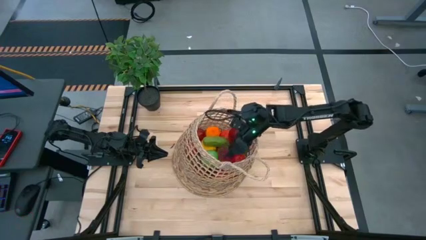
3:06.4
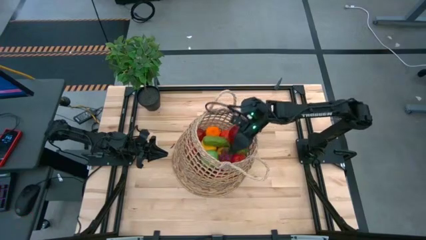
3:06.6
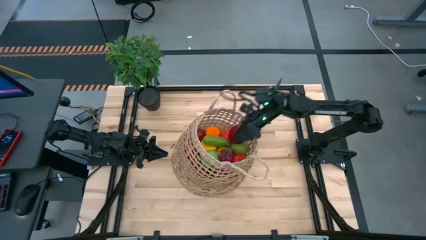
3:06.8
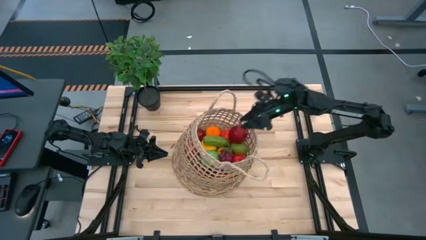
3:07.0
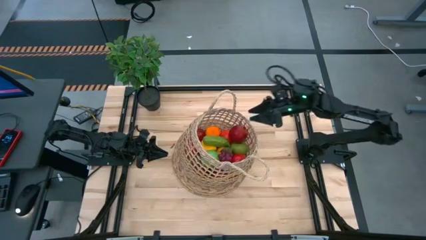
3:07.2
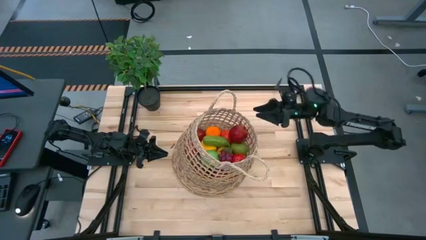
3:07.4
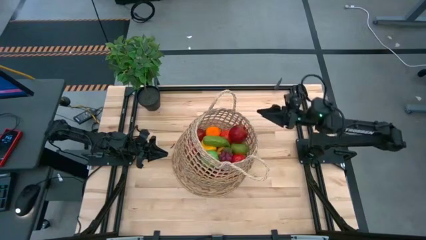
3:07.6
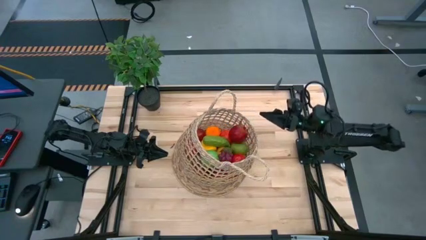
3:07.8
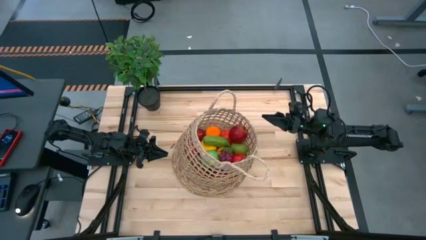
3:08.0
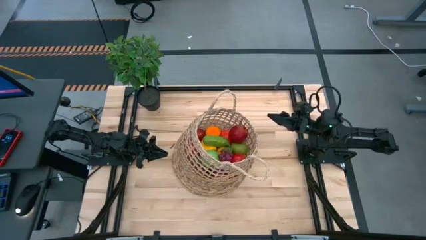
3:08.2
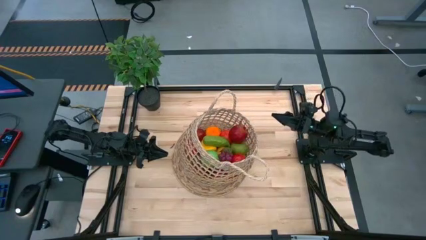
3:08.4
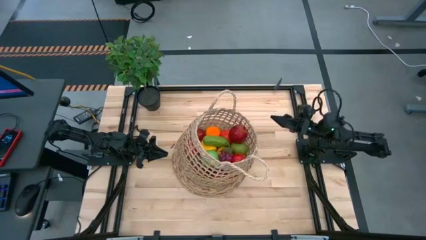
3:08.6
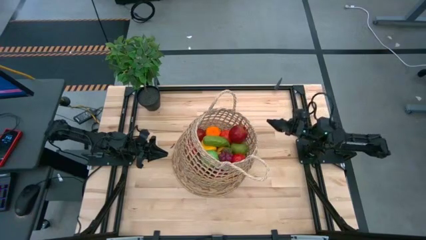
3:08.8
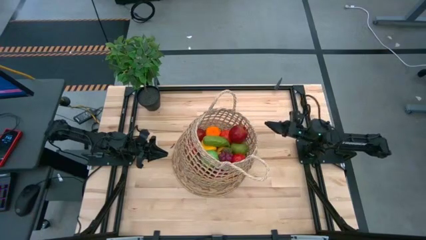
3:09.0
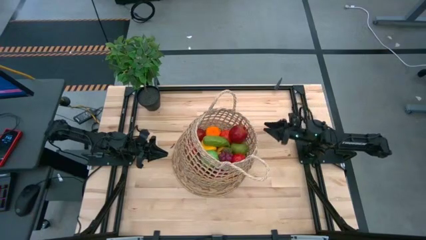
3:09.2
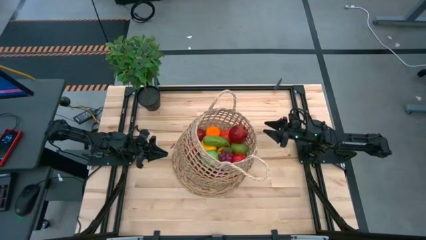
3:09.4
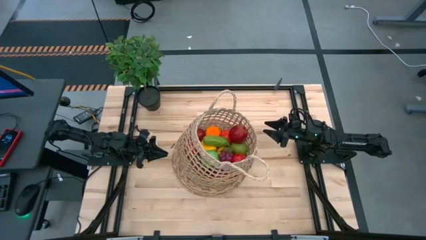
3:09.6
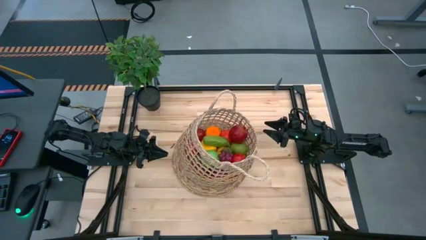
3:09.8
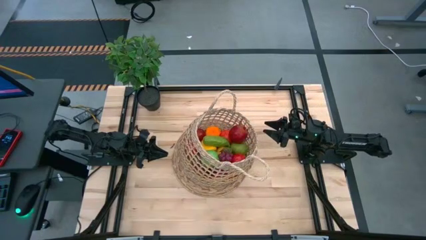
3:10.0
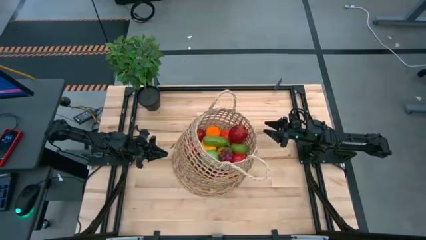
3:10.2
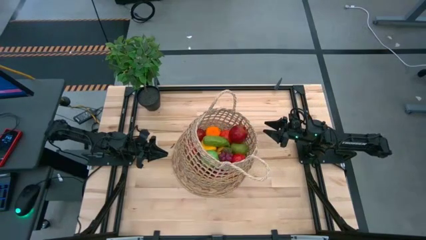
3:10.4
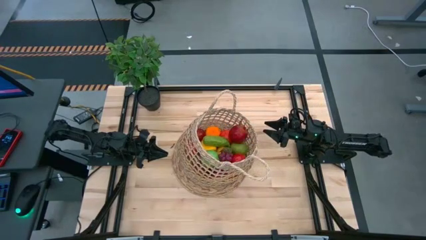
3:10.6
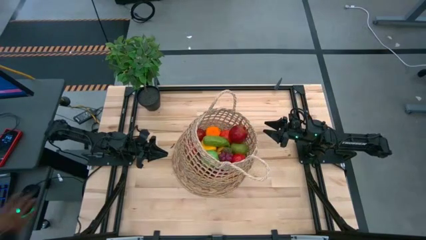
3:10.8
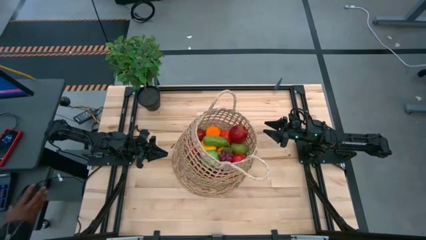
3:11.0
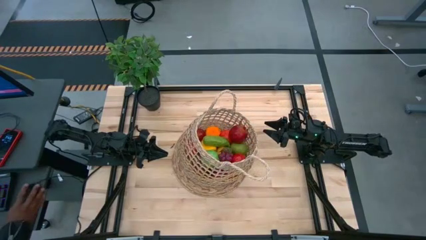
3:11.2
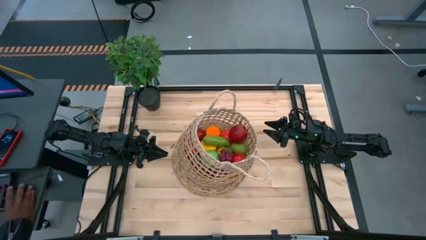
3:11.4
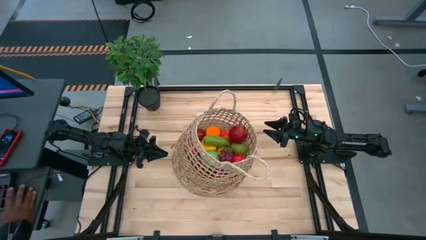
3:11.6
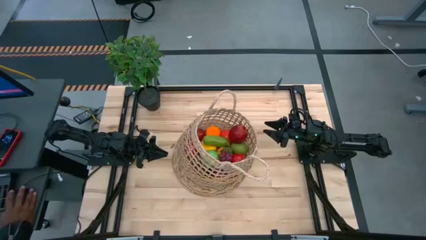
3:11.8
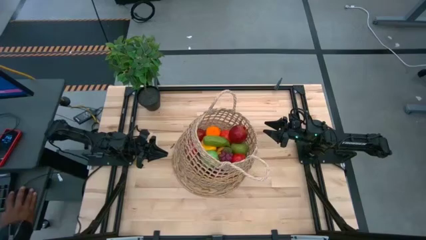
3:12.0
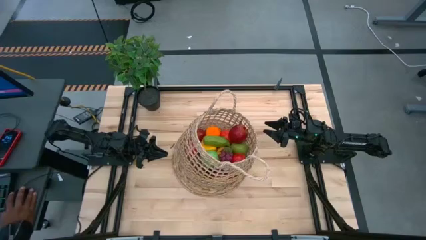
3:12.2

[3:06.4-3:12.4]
Task: Build produce basket
Return to home position

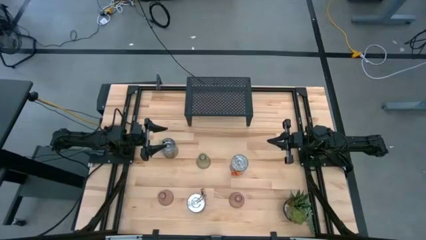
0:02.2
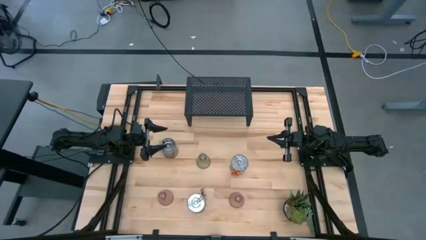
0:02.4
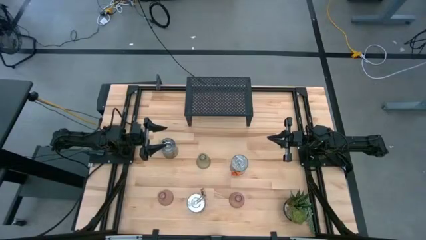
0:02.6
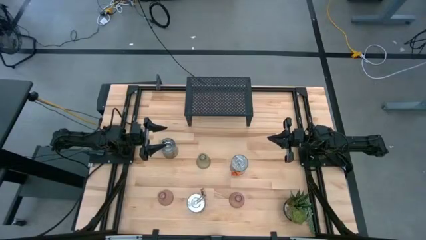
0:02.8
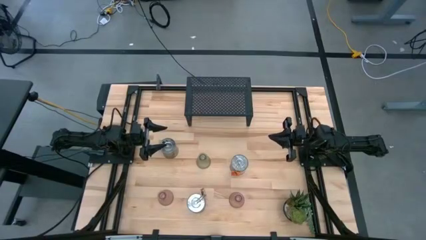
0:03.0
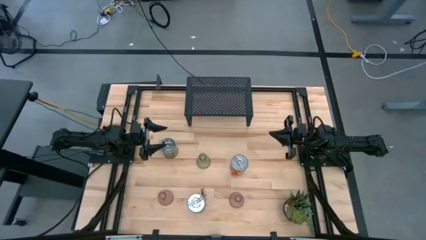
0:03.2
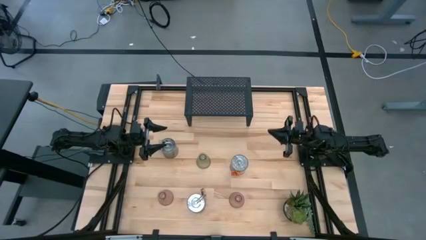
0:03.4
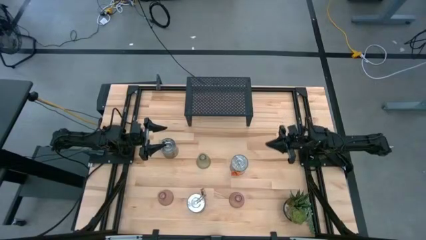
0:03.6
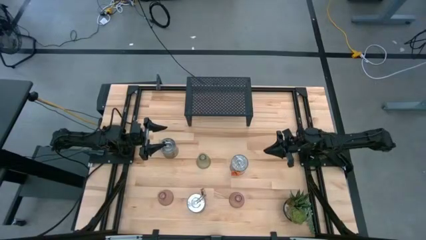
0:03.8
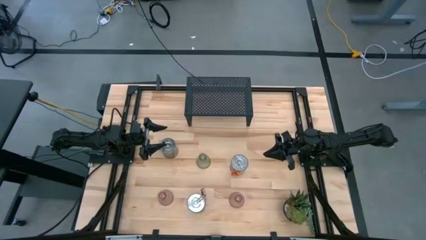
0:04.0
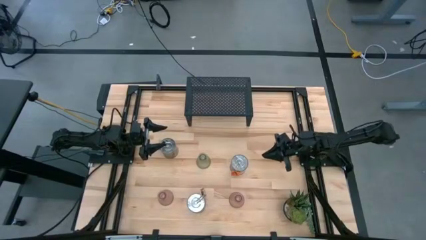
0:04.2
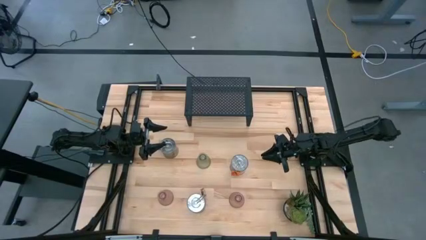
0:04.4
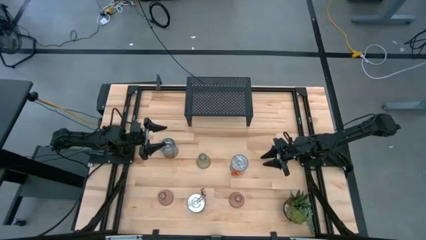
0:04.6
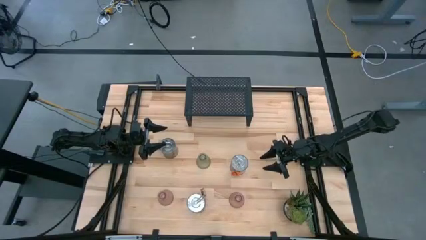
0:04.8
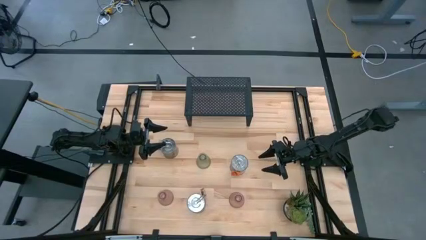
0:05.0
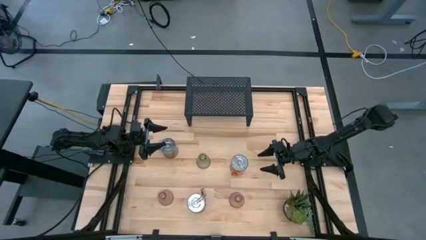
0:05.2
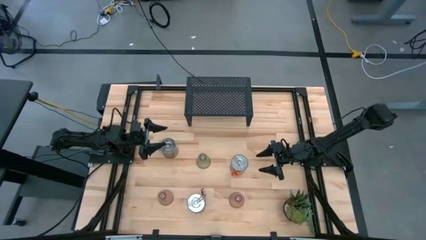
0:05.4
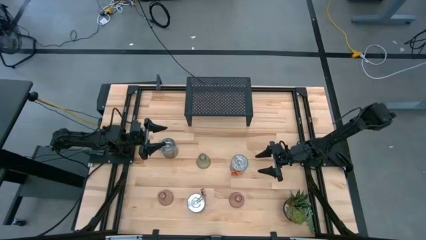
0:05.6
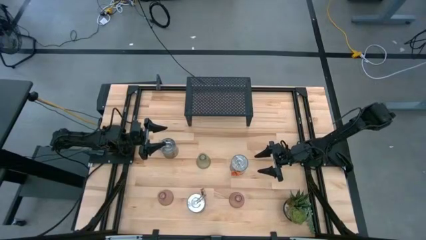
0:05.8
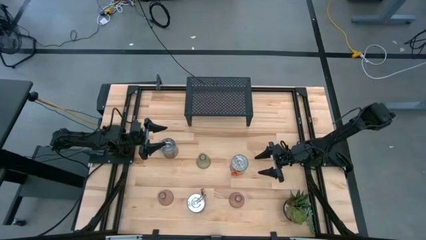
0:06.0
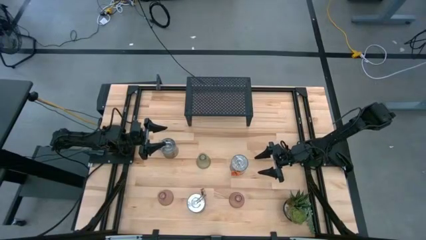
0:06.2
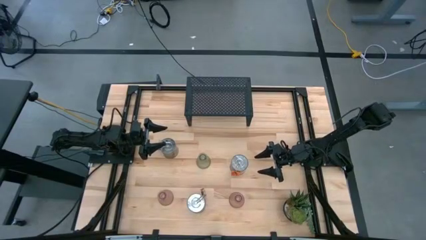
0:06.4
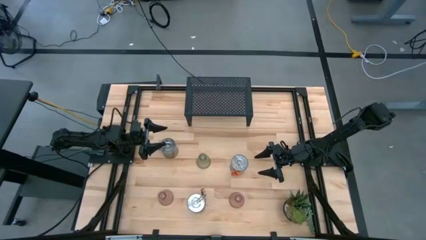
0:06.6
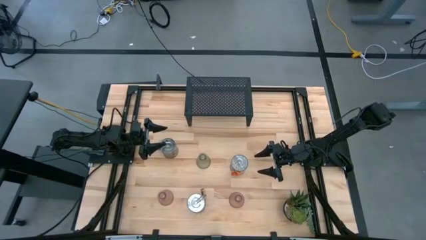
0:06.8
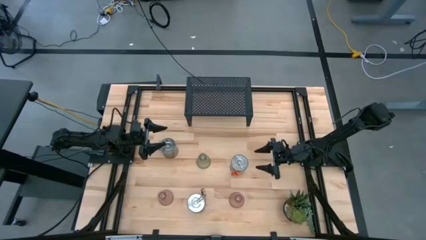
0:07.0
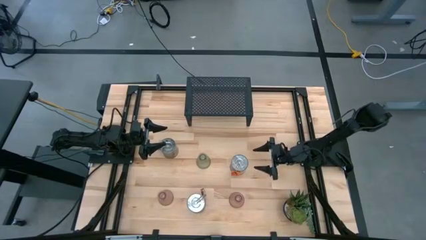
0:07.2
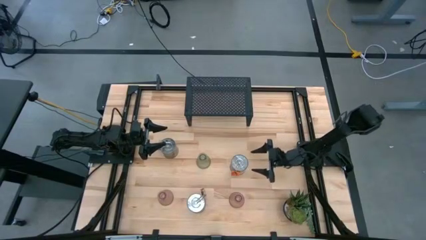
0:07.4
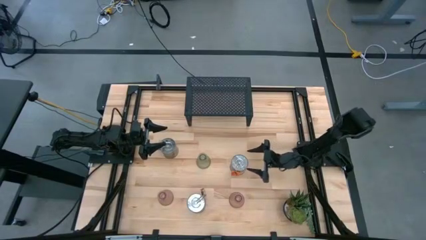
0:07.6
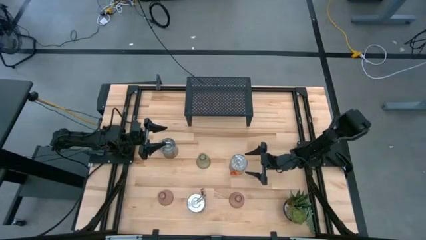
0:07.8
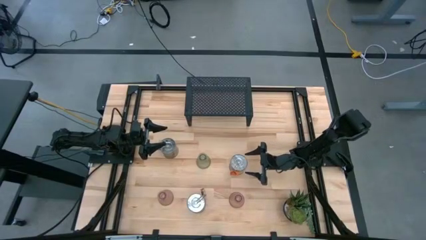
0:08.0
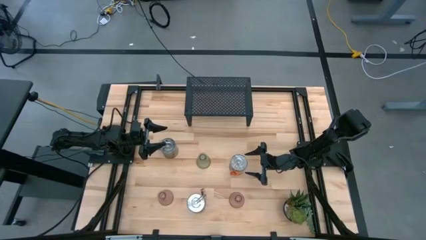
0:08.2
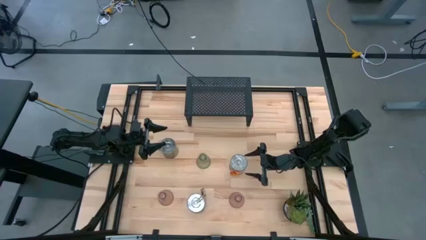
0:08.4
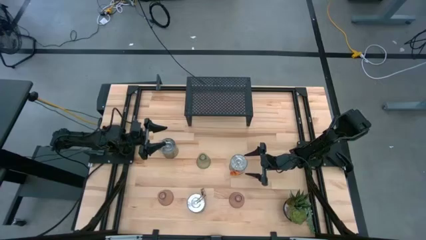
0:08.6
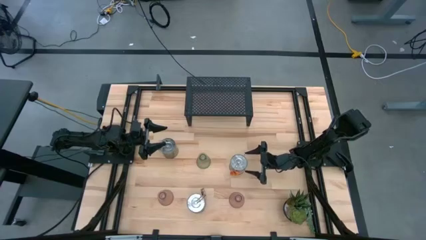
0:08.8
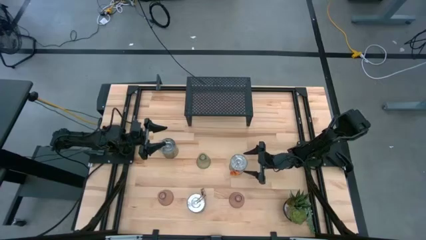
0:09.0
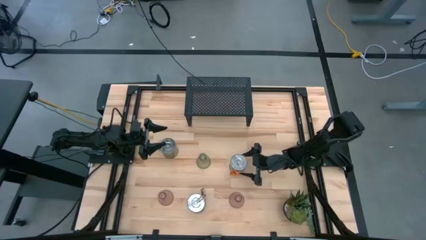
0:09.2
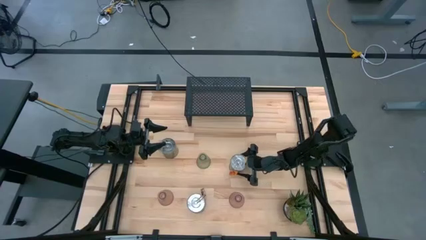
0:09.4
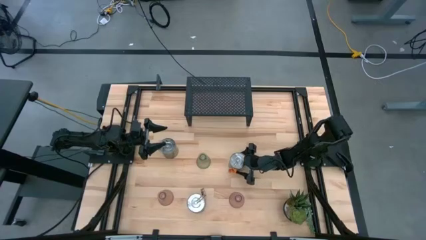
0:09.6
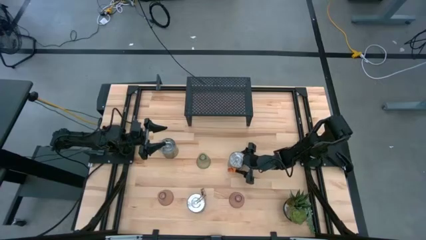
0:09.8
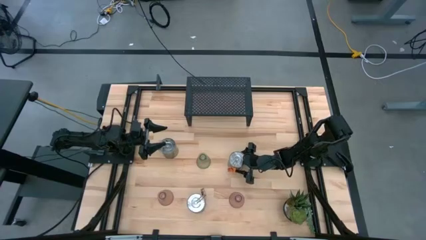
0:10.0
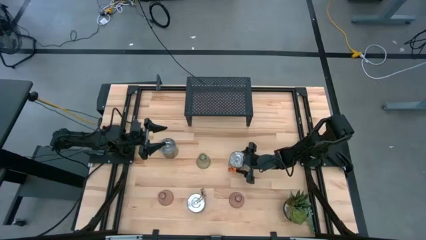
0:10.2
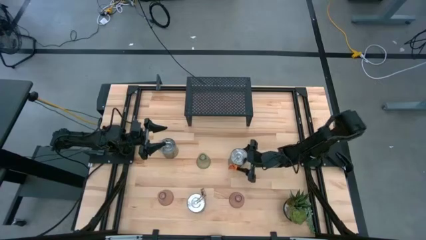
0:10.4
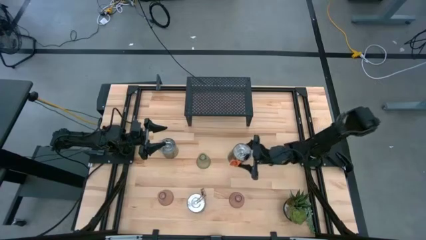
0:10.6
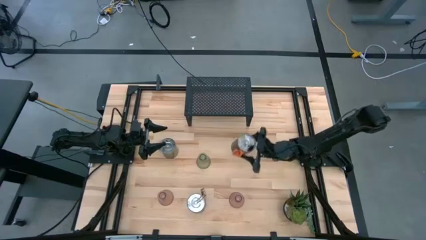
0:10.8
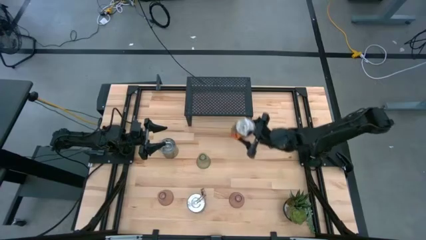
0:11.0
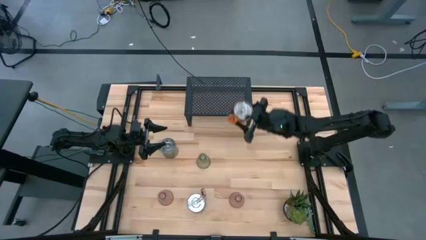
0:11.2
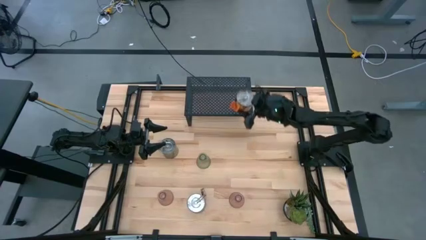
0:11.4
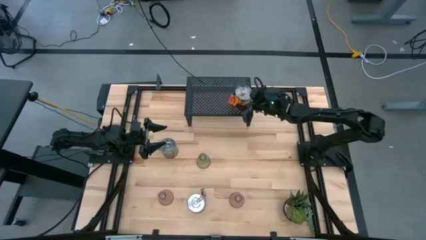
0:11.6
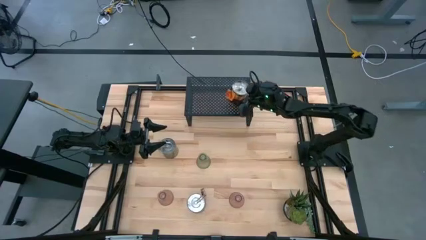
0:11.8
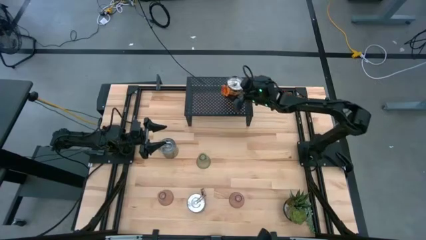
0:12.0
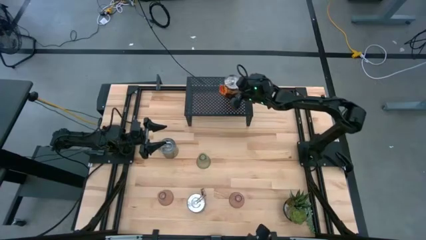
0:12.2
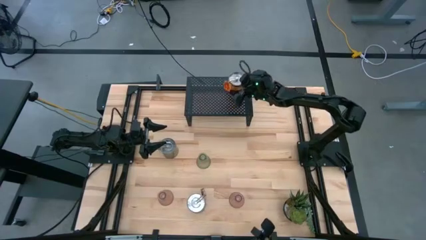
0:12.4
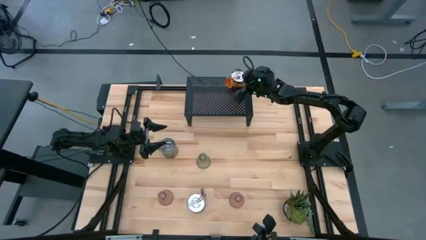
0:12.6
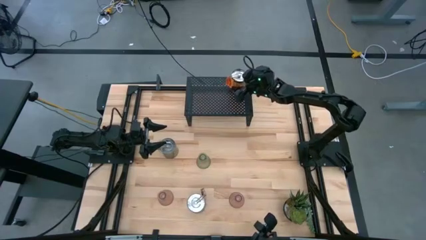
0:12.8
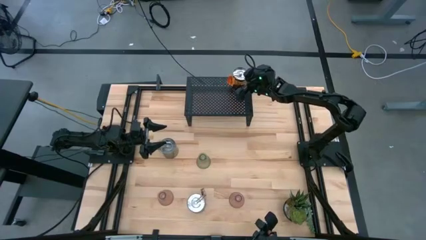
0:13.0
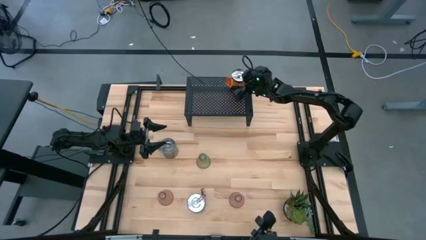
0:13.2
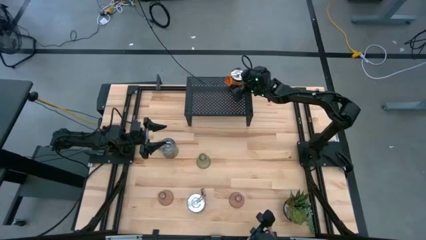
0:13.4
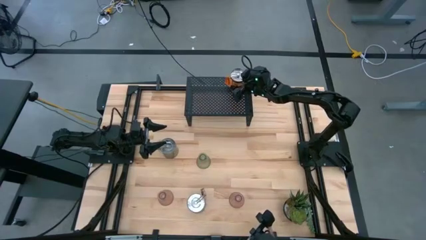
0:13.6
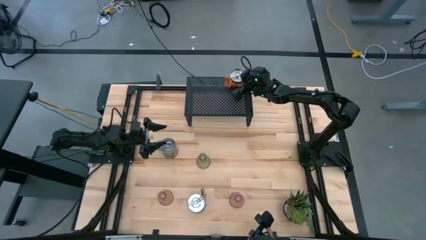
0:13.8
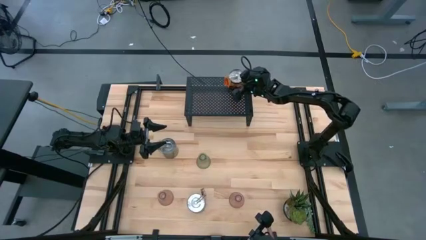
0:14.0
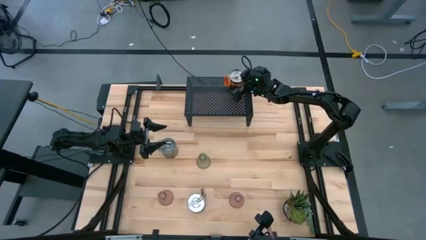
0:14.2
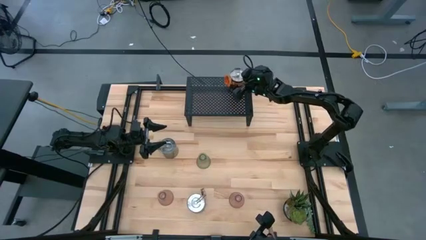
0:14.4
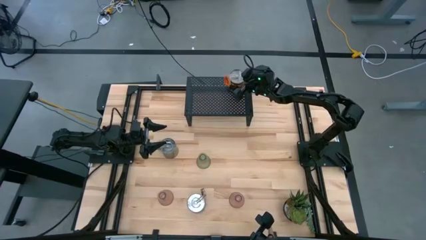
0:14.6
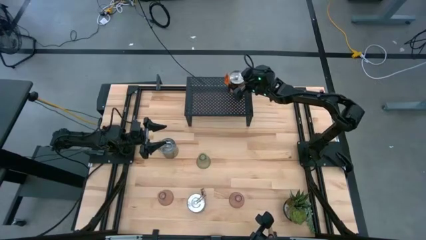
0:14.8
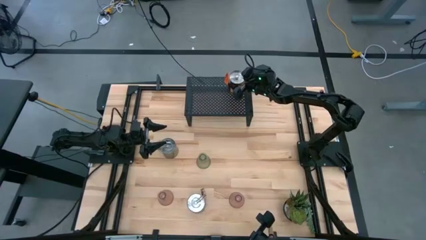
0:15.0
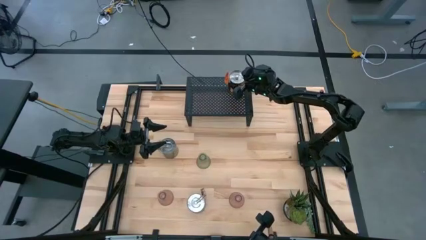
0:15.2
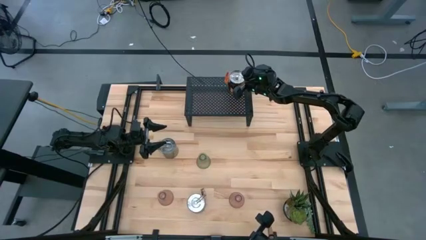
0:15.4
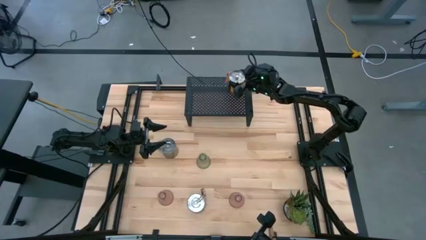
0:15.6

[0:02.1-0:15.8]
Task: Pick & Place candle stick holders
Put the middle right silver scented candle on the shelf
